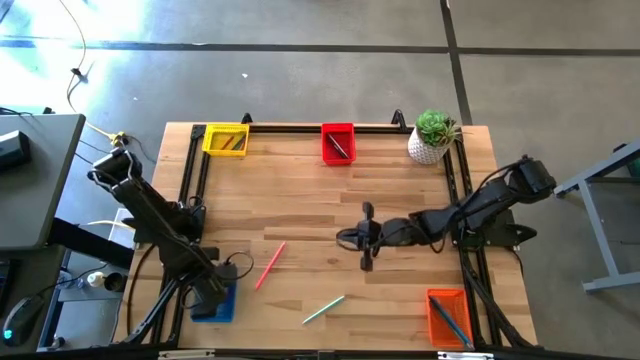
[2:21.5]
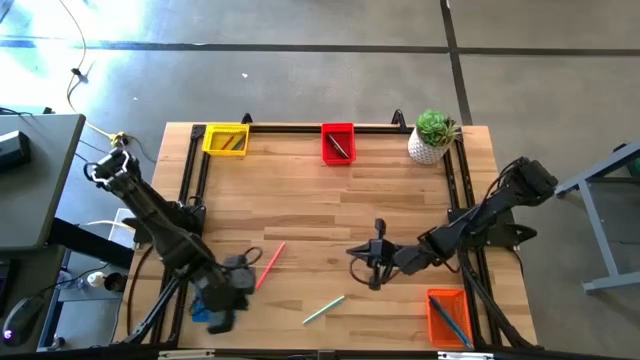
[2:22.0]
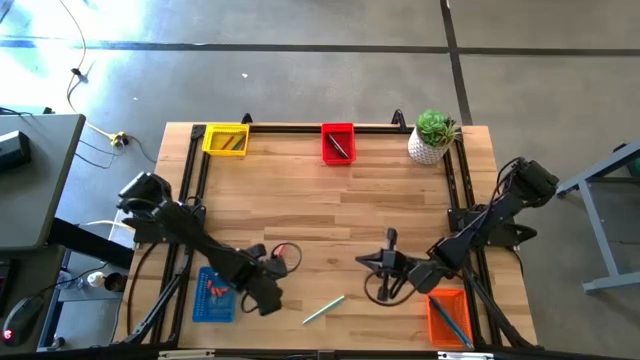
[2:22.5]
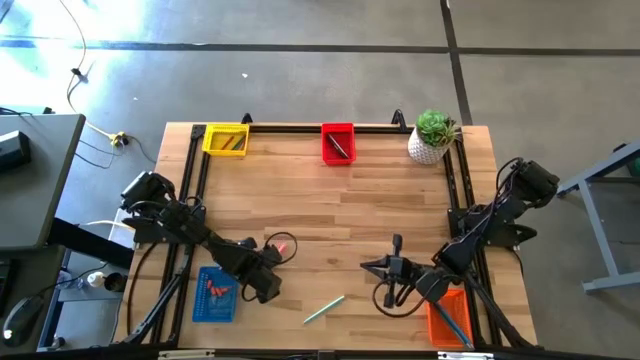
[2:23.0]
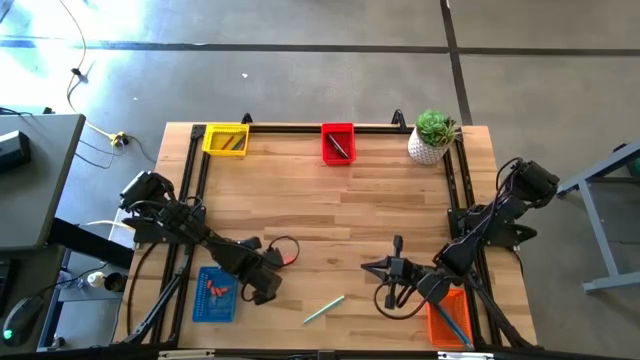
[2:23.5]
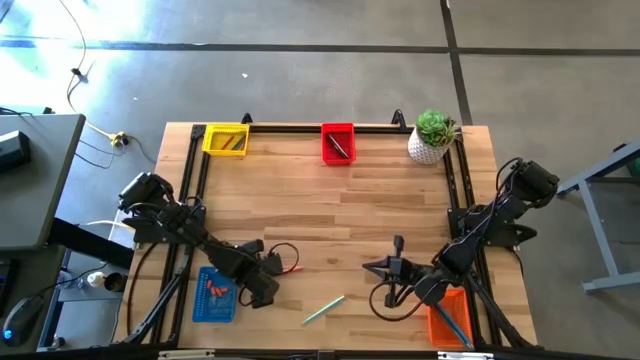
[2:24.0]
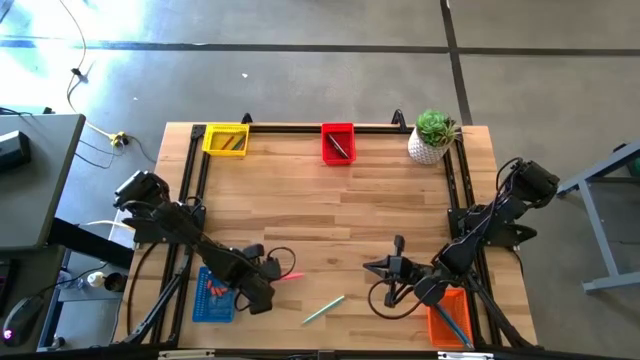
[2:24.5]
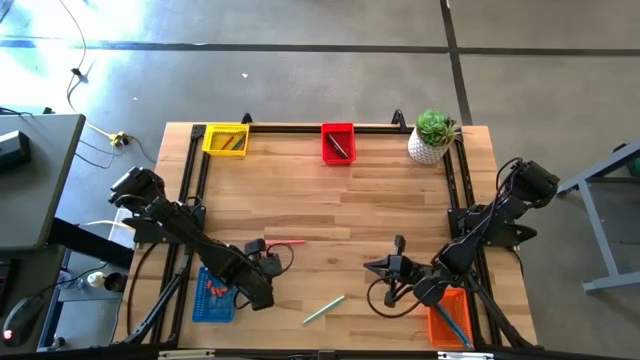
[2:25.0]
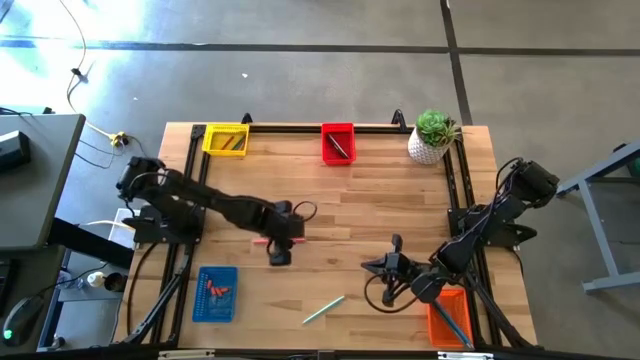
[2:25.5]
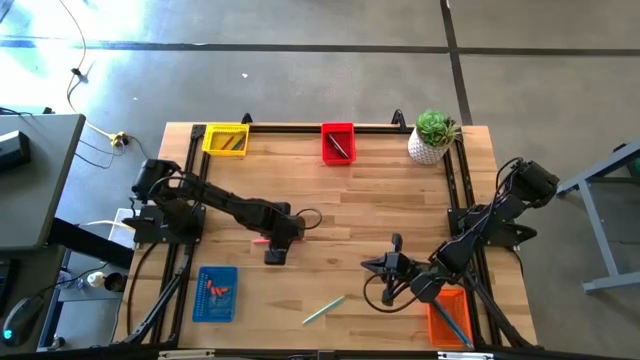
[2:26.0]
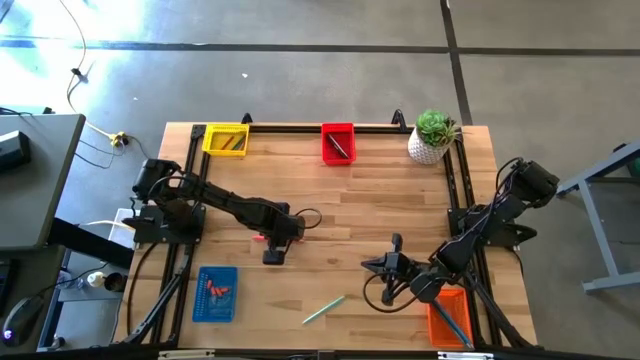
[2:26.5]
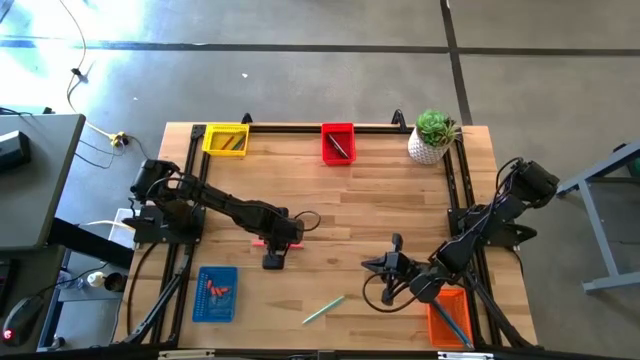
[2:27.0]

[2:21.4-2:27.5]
Task: Sort crayons/erasers/pens/pencils in bins
Put the pink pencil into the orange bin

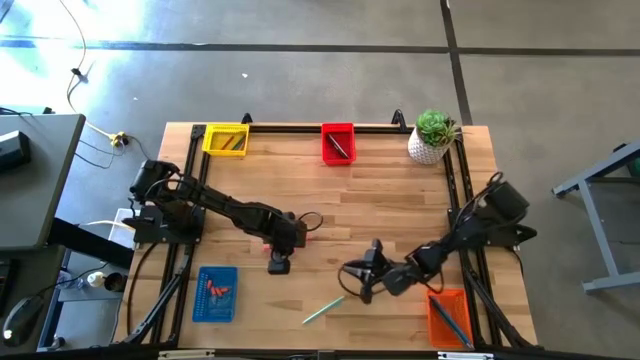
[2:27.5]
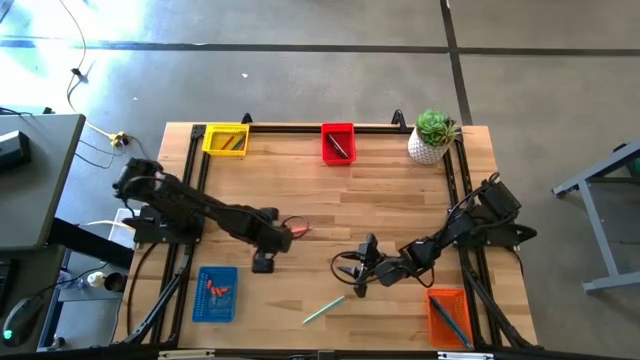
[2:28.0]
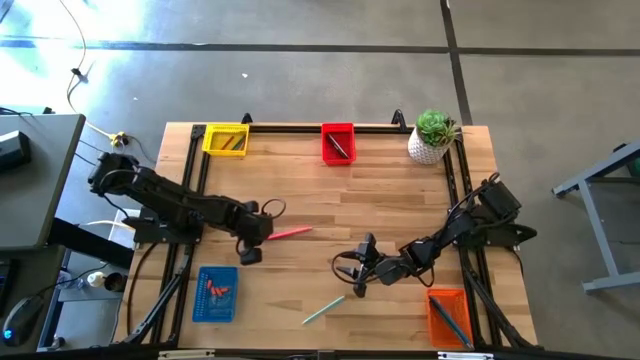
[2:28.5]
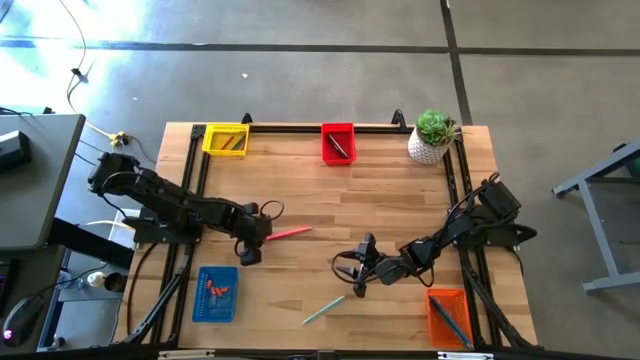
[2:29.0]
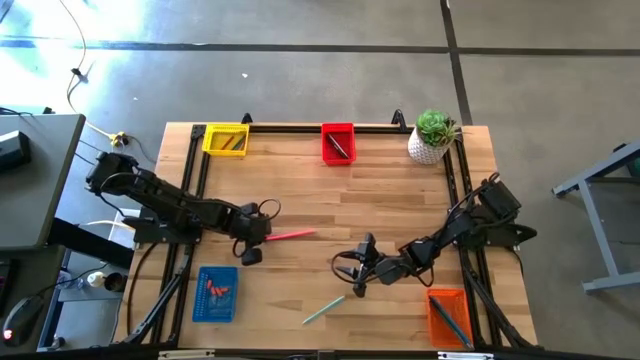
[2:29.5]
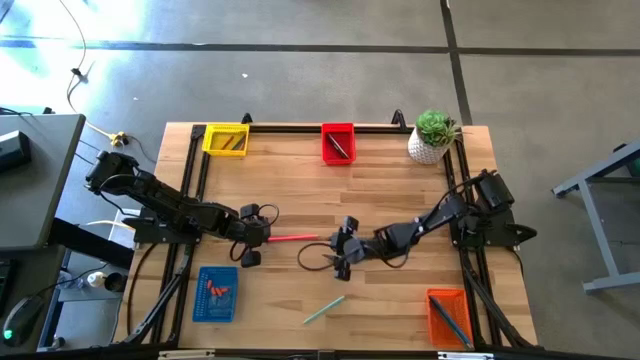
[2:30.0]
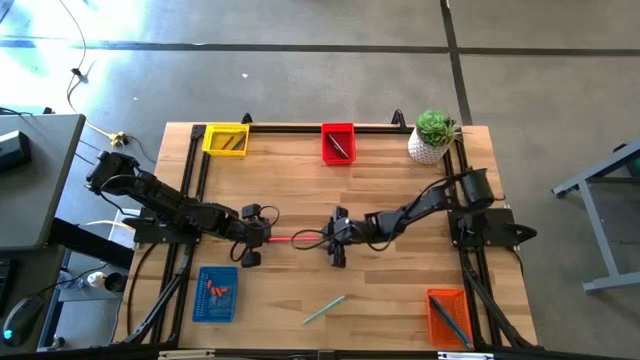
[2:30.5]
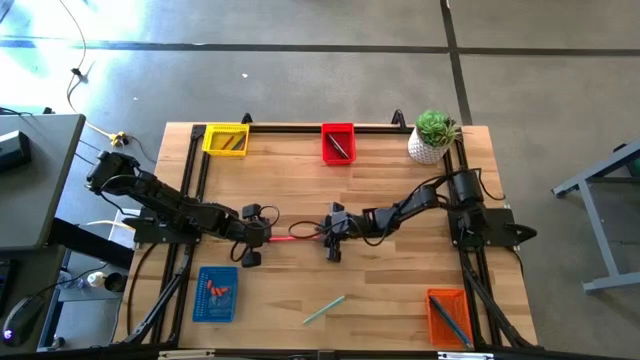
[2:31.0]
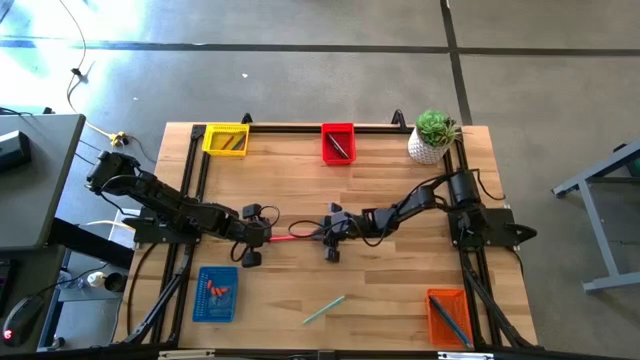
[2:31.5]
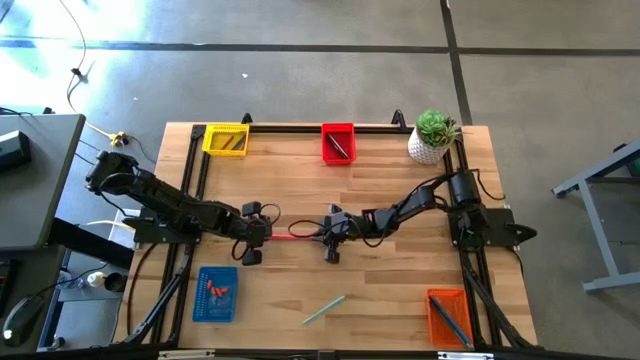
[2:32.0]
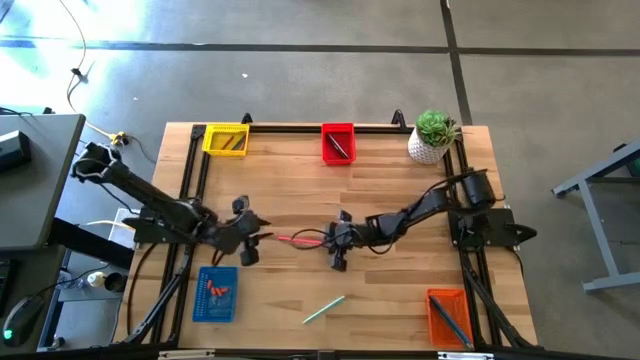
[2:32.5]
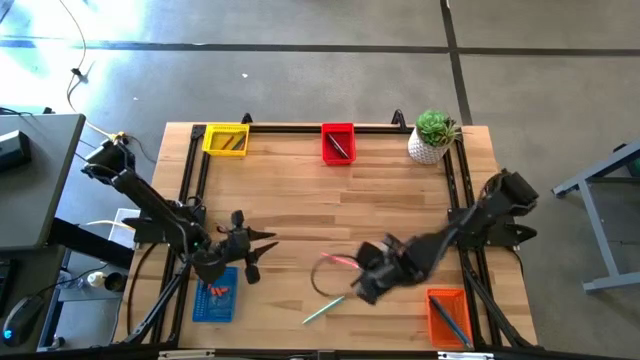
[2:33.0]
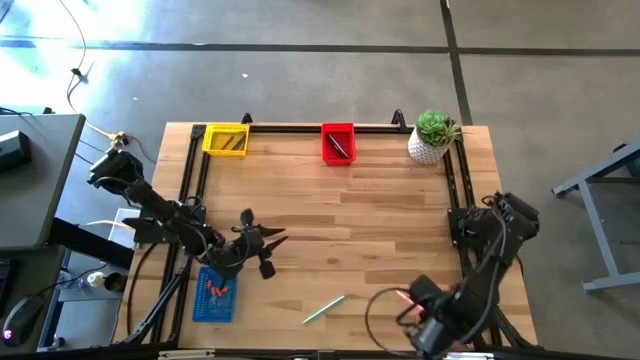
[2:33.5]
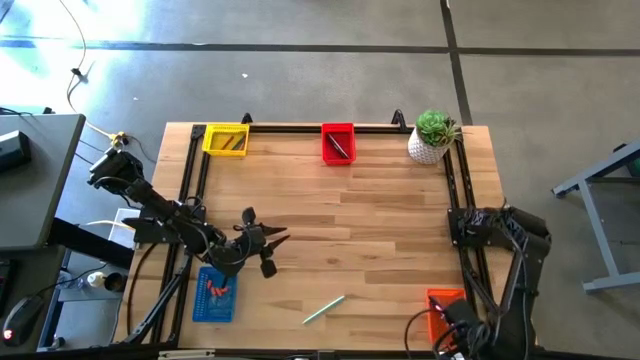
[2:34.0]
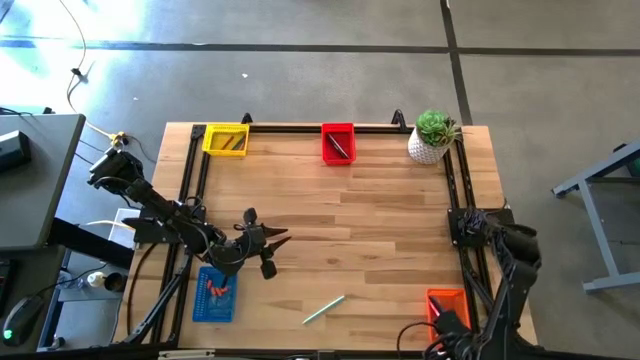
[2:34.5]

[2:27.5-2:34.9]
Put the pink pencil into the orange bin

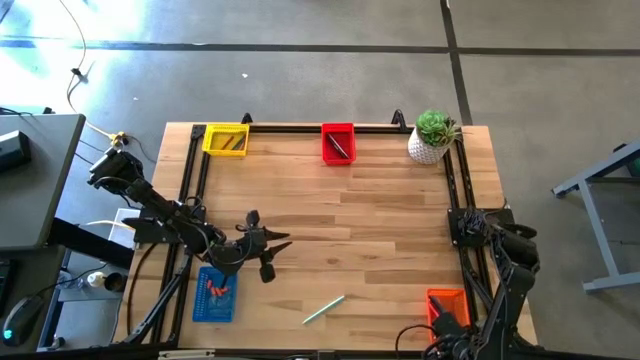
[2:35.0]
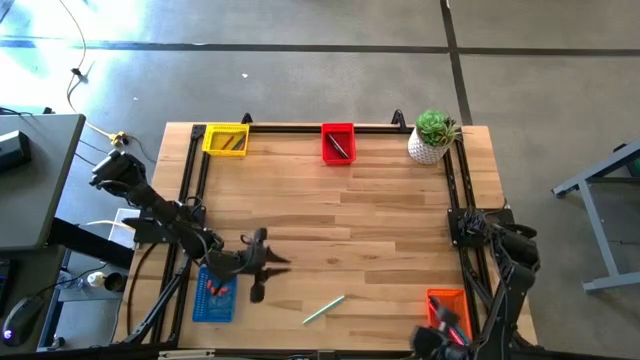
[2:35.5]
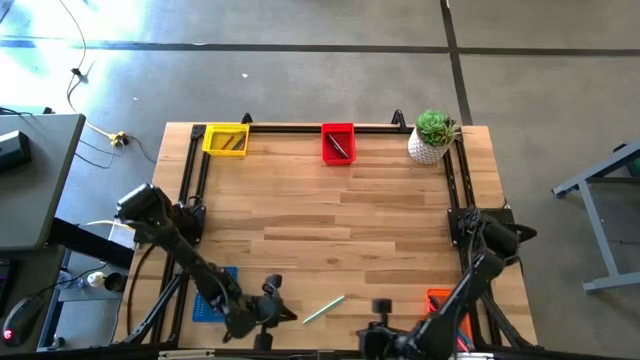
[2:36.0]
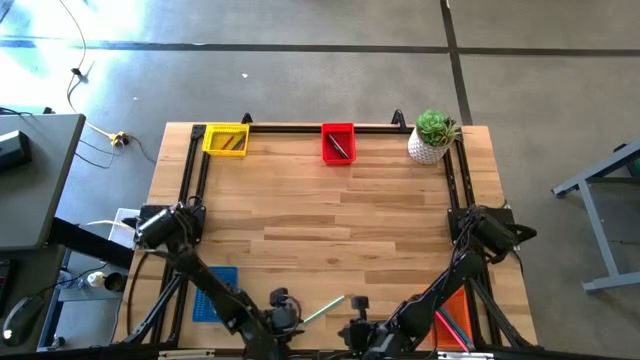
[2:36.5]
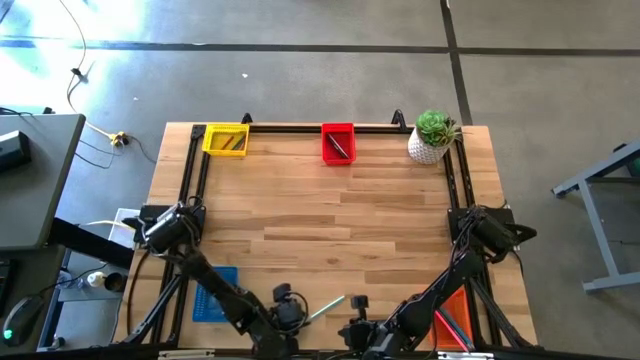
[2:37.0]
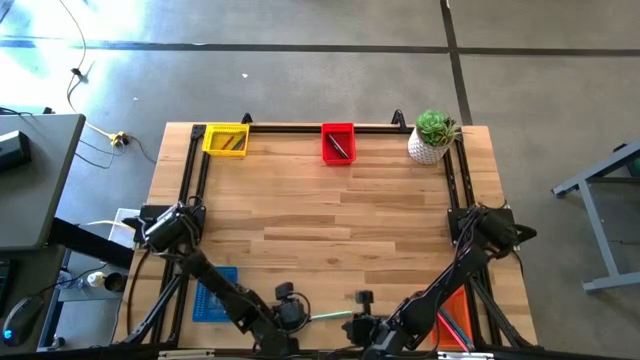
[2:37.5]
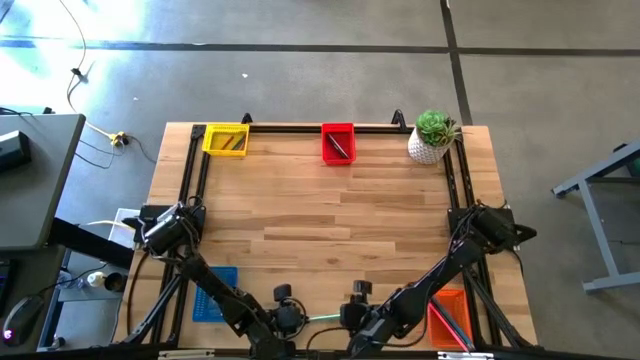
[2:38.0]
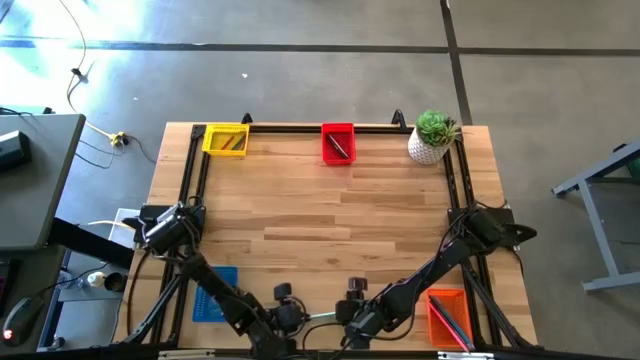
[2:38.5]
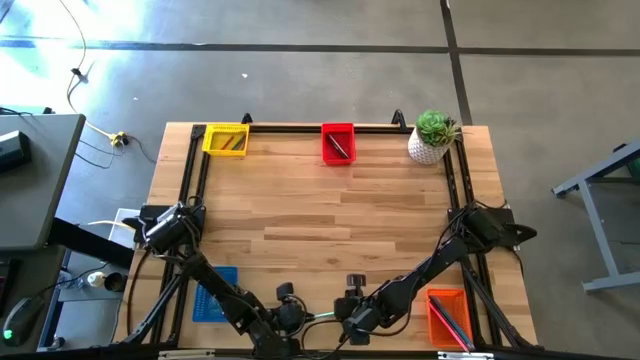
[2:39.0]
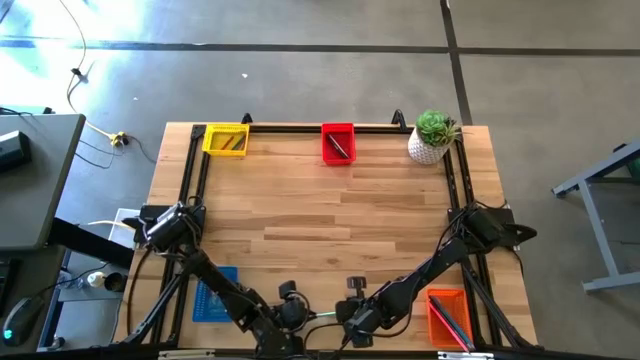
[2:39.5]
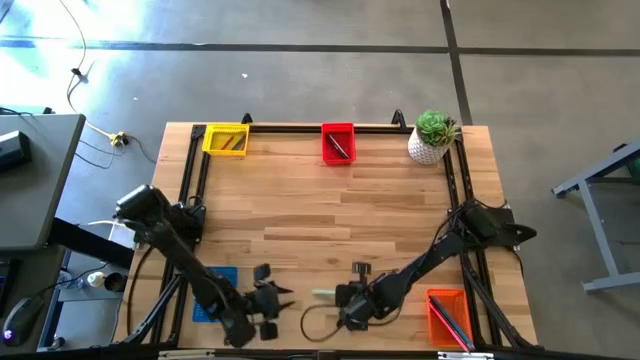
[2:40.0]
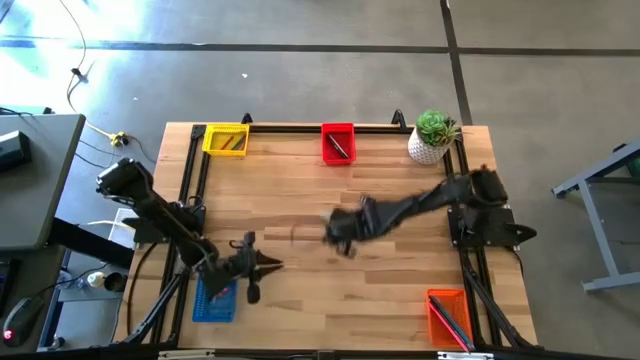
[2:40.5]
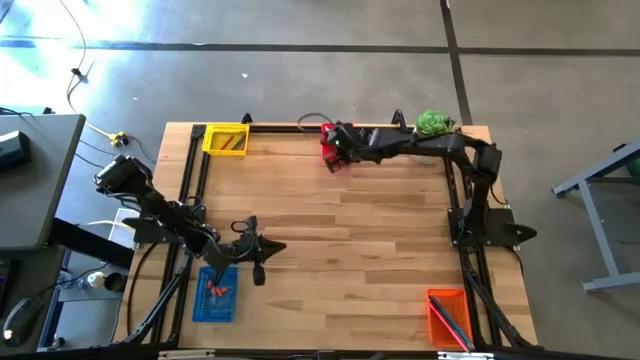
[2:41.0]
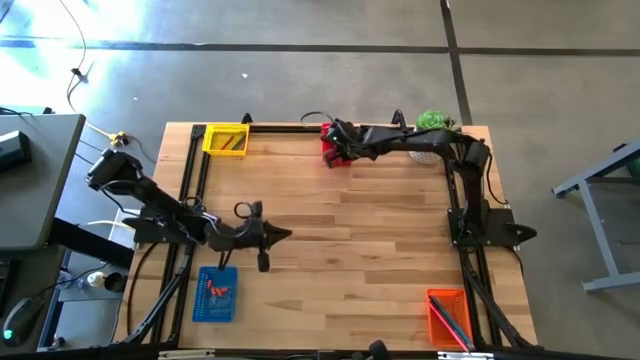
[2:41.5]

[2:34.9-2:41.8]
Put the light blue pen into the red bin
